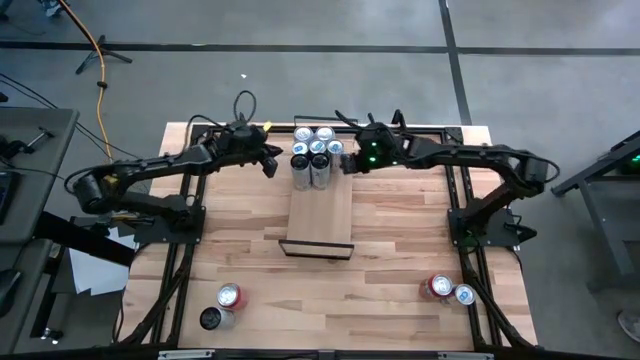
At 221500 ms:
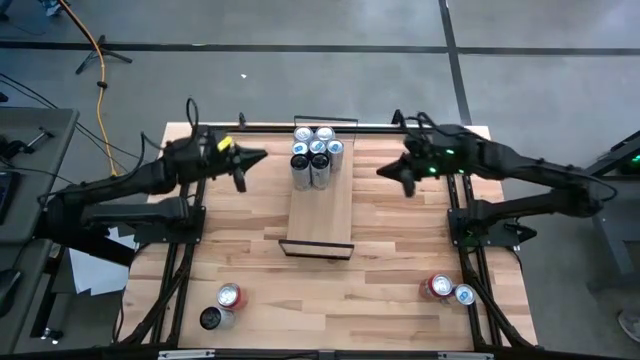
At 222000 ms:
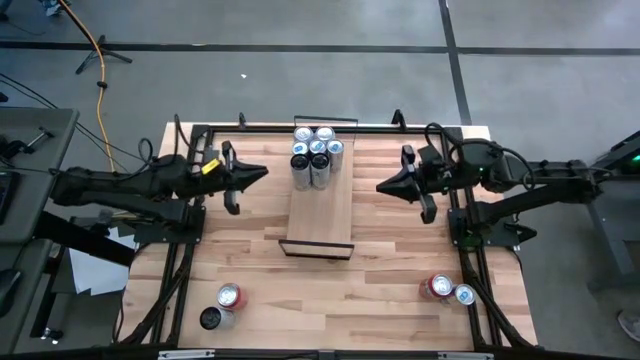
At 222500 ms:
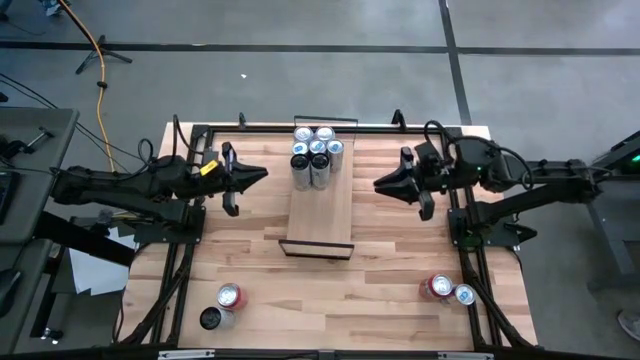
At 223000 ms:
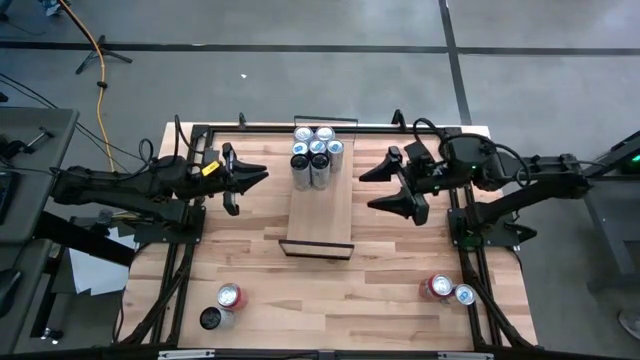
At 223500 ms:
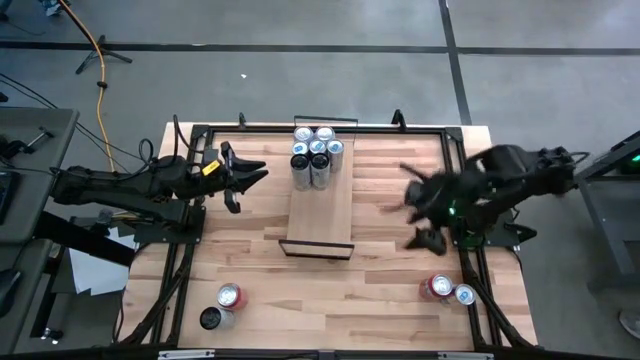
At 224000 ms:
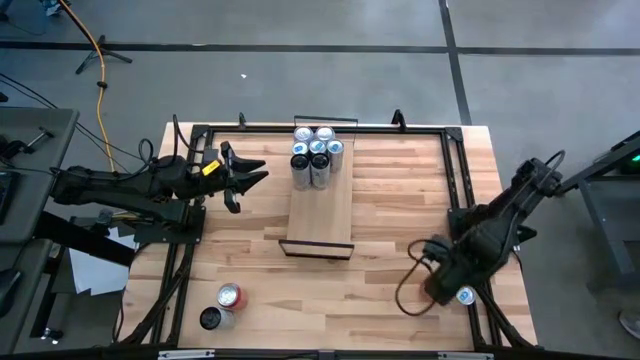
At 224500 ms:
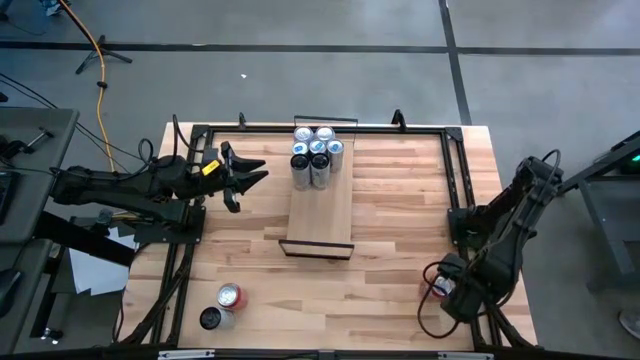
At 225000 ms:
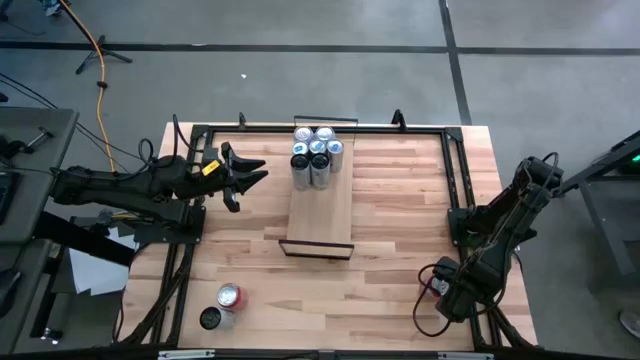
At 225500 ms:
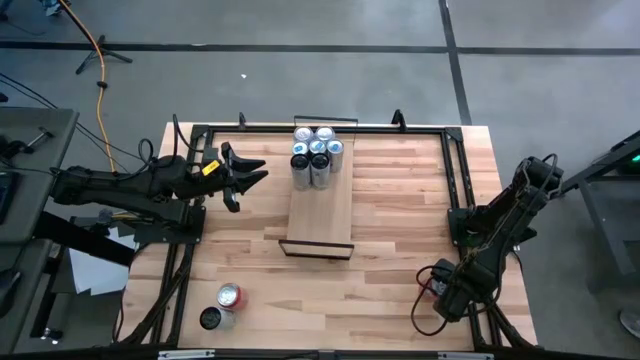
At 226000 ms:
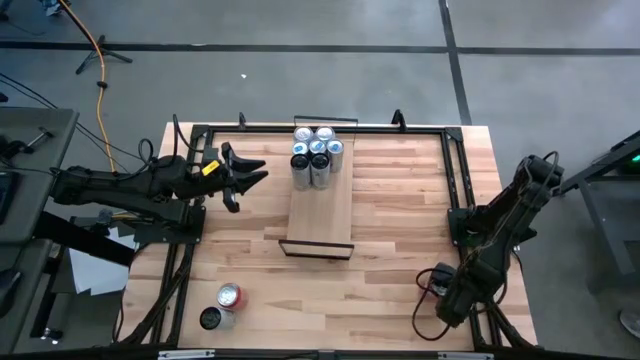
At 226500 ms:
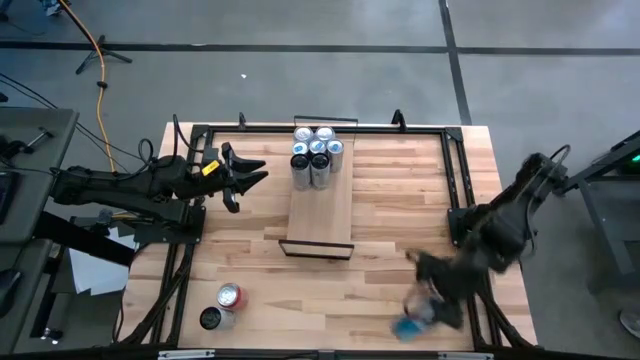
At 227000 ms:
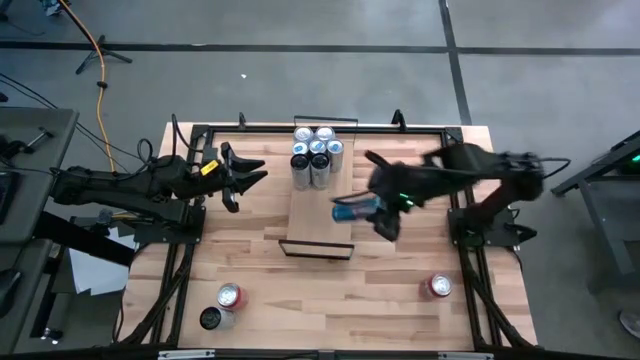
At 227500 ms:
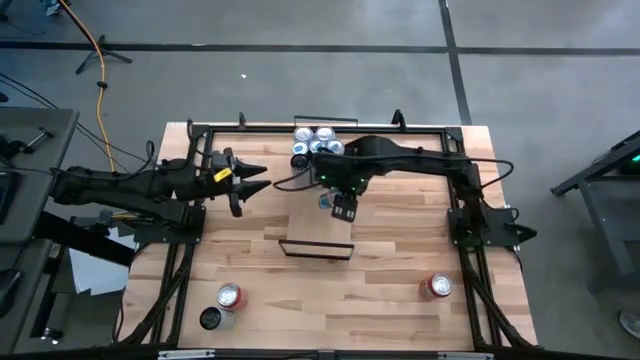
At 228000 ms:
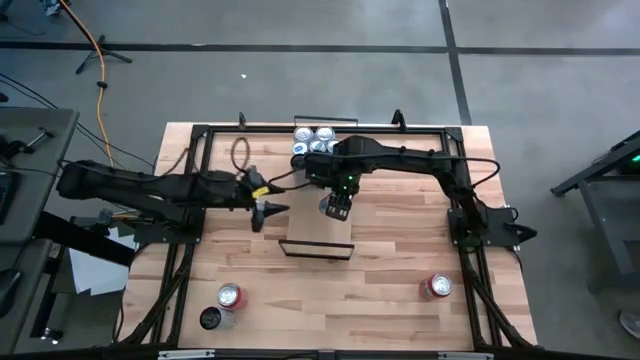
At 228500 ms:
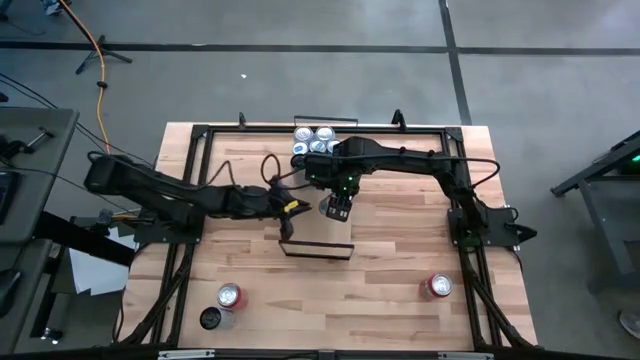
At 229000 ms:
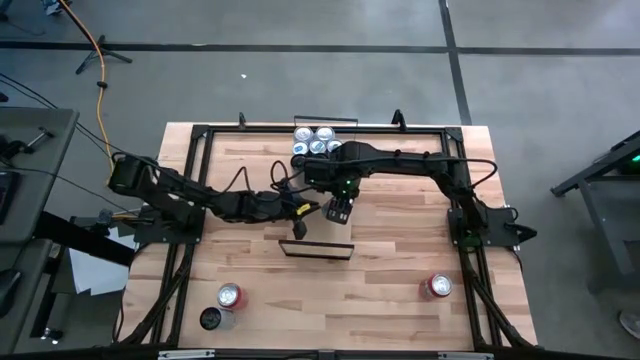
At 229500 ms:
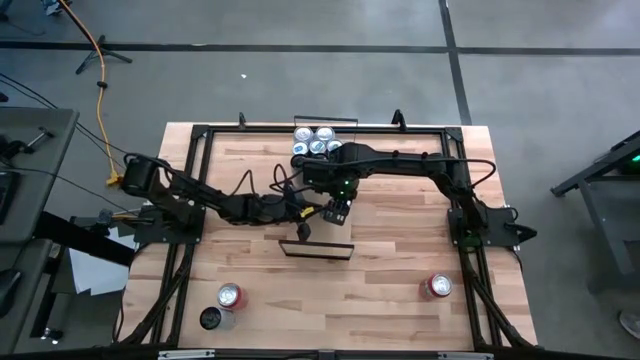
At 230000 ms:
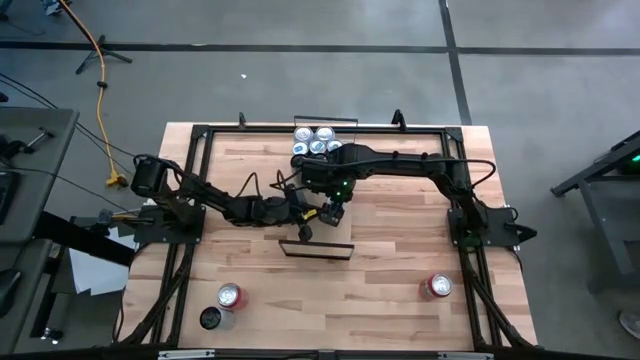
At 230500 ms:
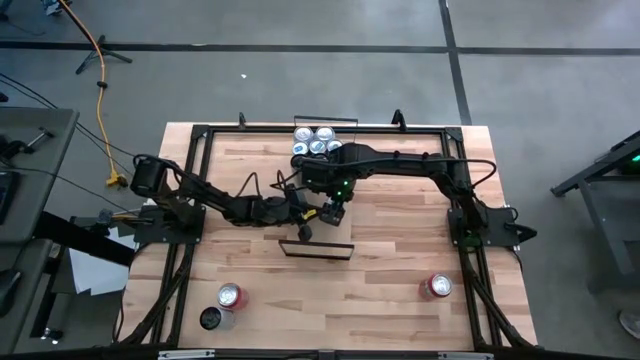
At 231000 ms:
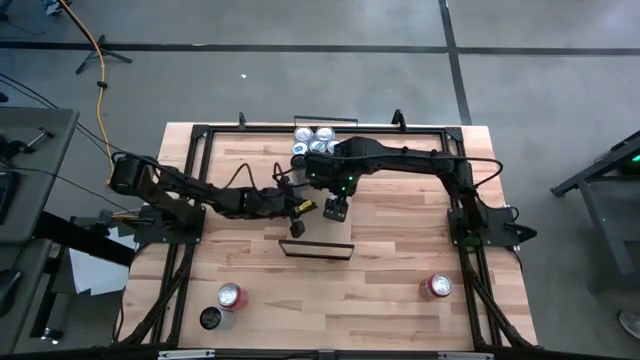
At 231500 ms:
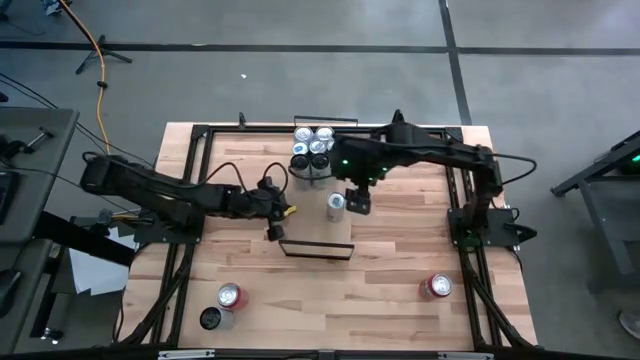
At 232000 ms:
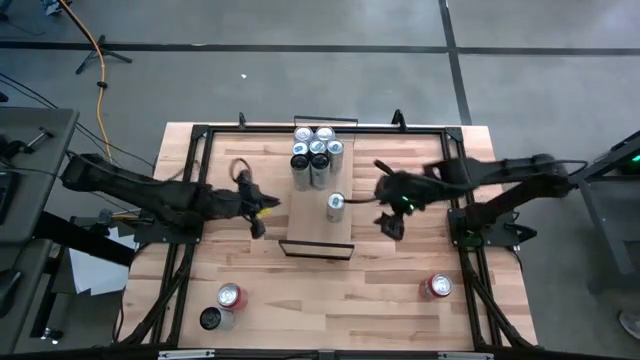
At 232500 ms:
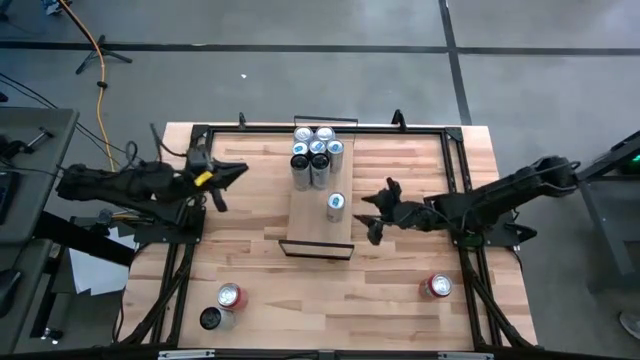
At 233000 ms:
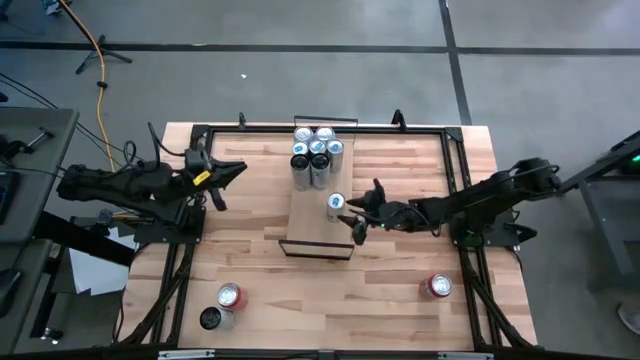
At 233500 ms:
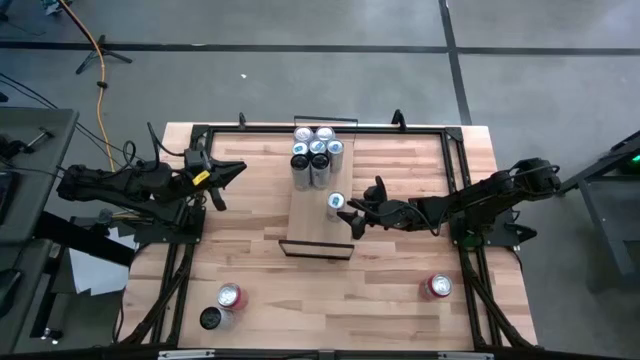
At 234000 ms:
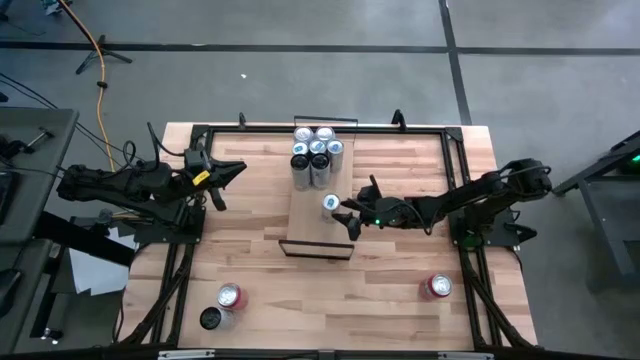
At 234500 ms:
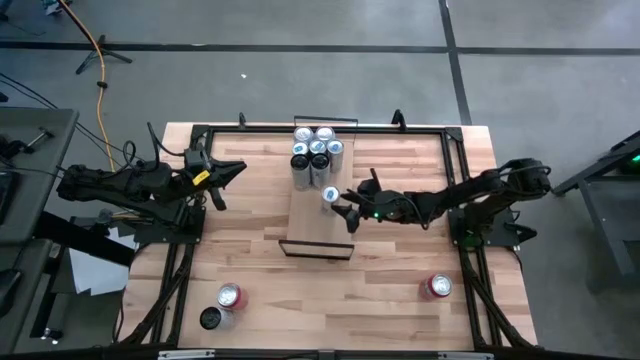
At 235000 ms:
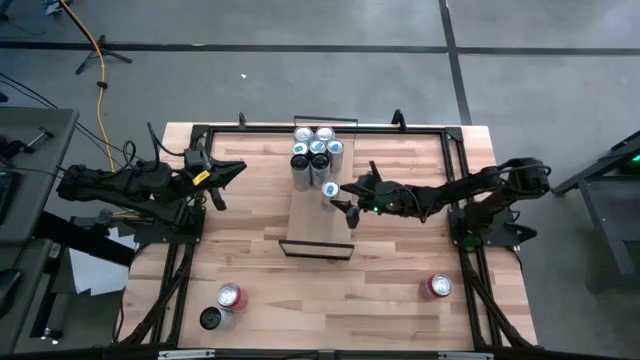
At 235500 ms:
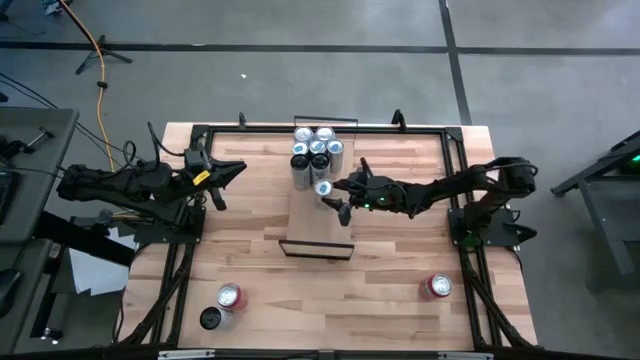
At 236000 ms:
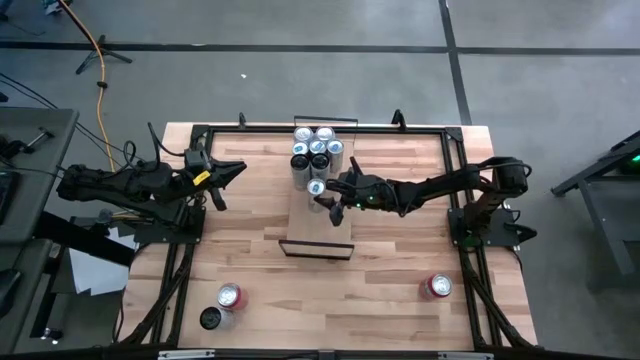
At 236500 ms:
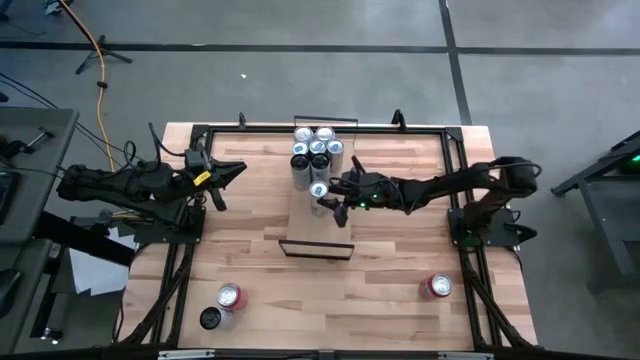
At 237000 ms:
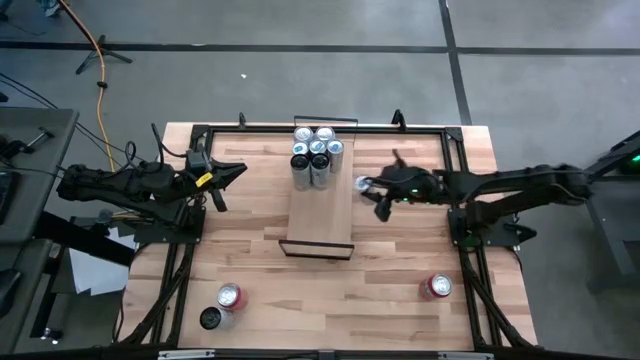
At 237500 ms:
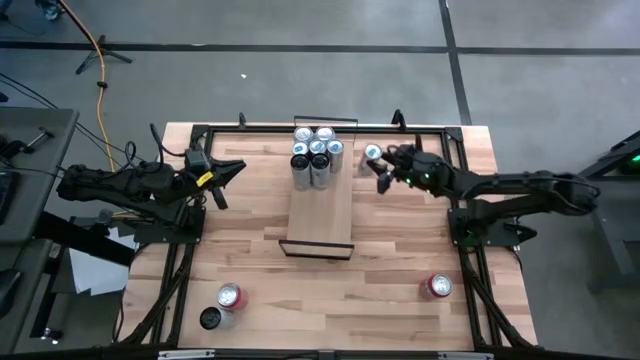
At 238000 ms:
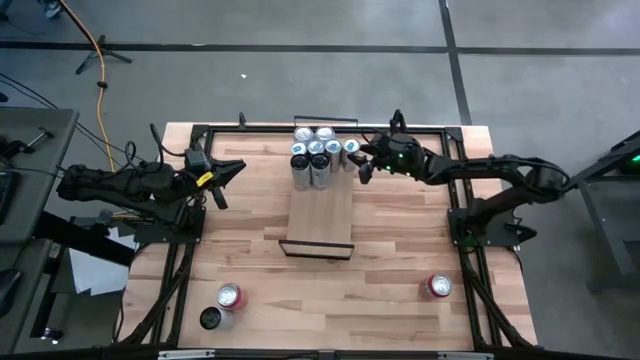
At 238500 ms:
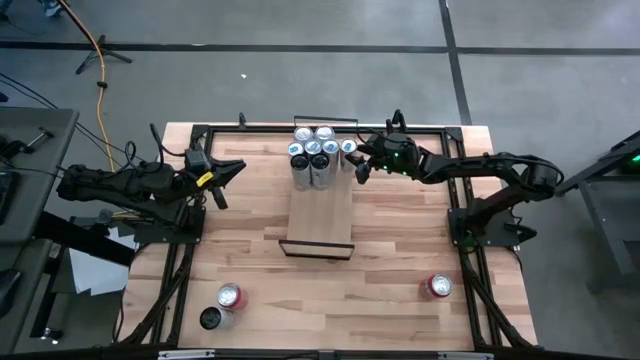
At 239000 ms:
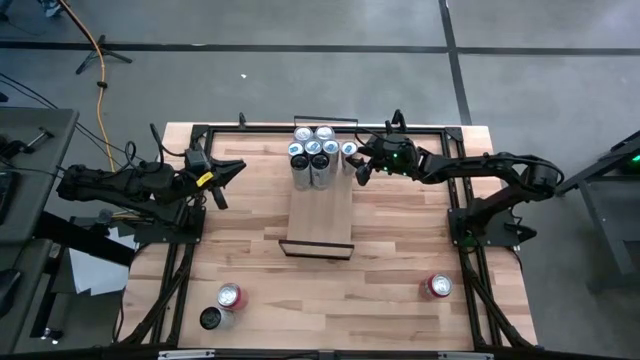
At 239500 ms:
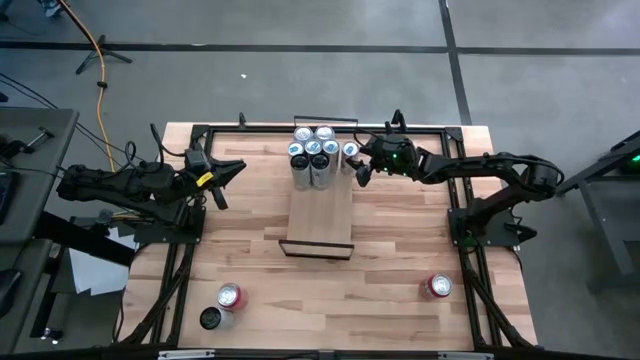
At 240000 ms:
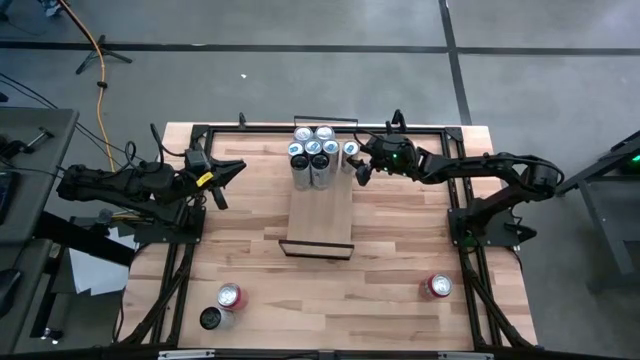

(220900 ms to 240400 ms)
Task: Place canned beverage on shelf
Put the blue soda can on the shelf aligned with the other blue soda can

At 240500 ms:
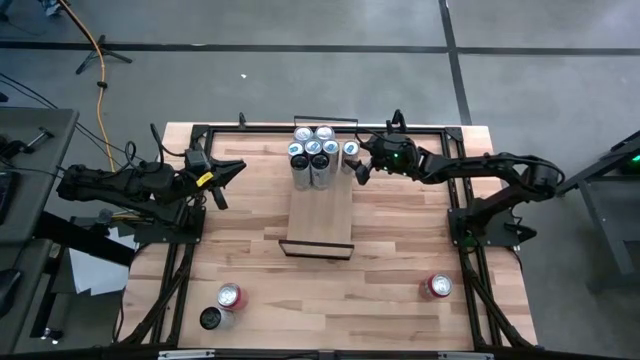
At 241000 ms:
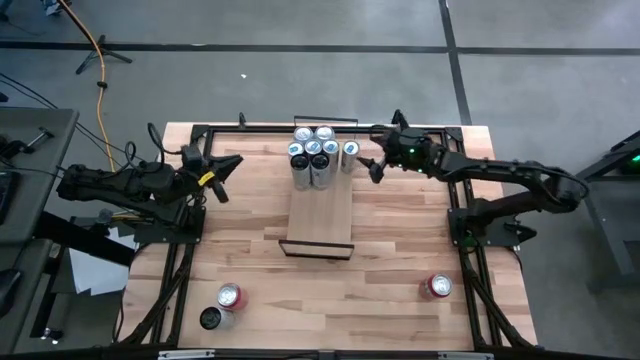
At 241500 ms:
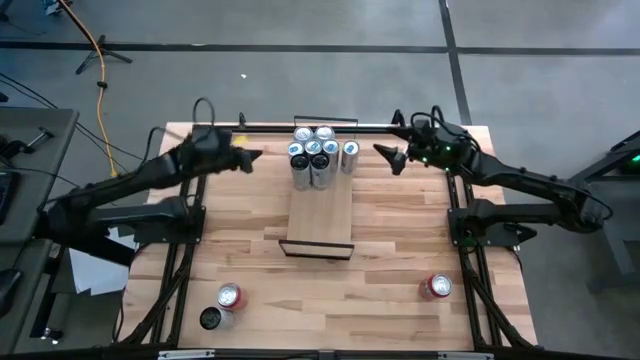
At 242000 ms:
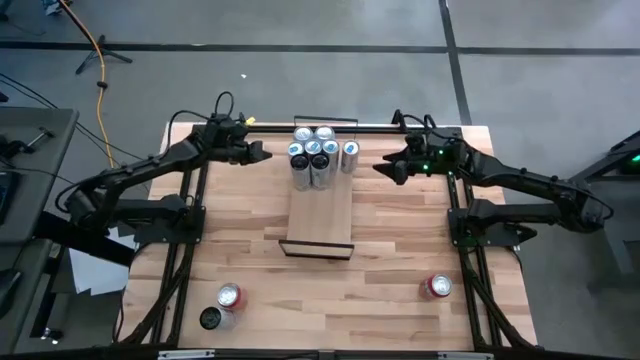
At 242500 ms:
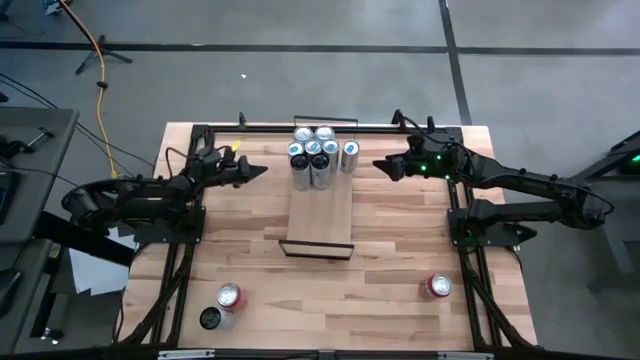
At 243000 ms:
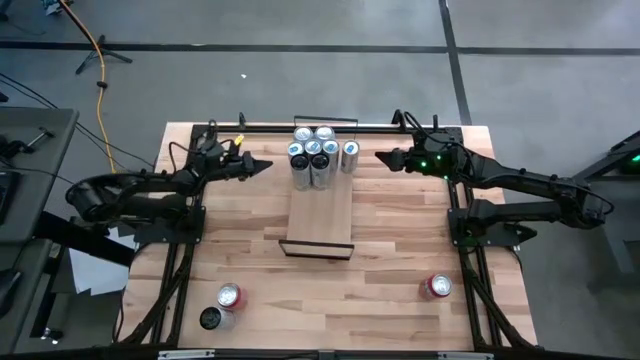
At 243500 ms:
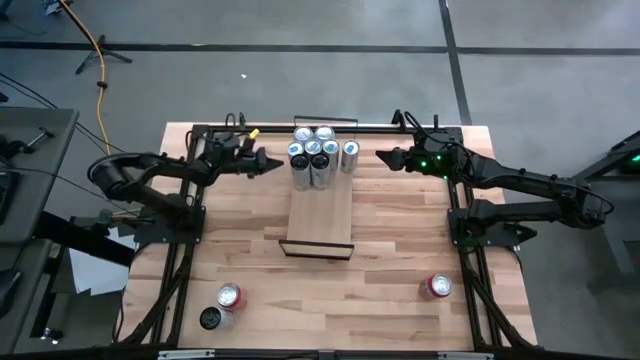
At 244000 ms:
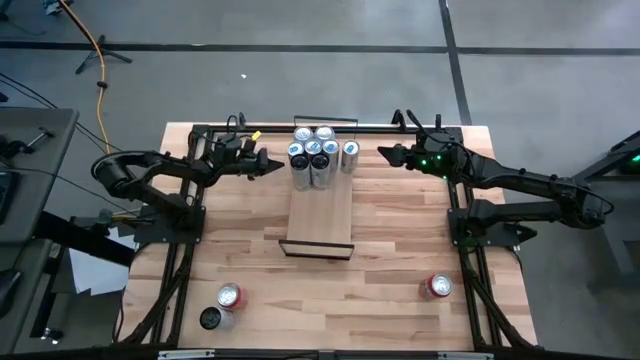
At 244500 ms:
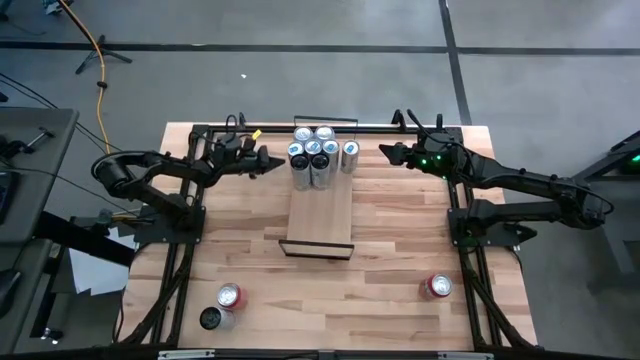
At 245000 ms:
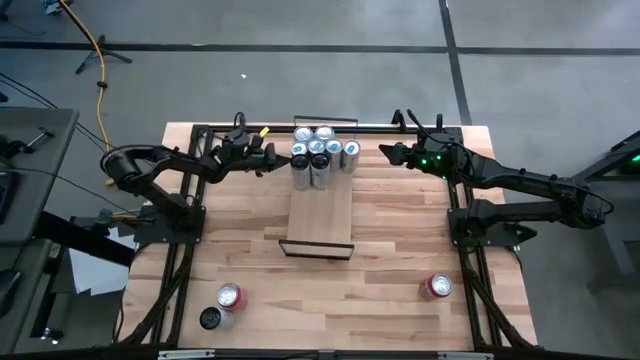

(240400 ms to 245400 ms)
Adjust the blue soda cans on the shelf
